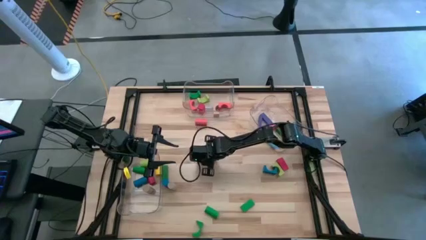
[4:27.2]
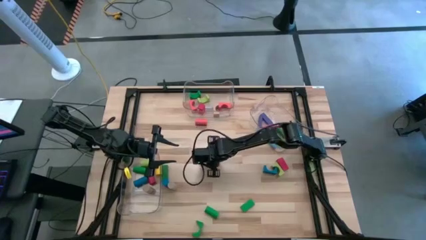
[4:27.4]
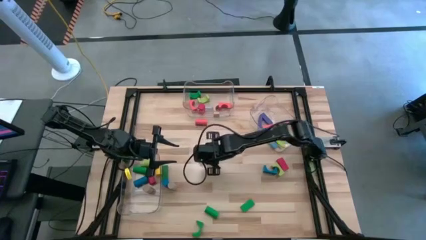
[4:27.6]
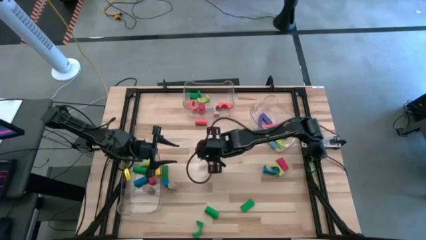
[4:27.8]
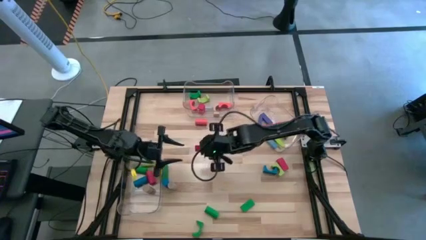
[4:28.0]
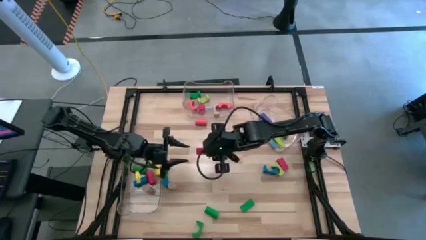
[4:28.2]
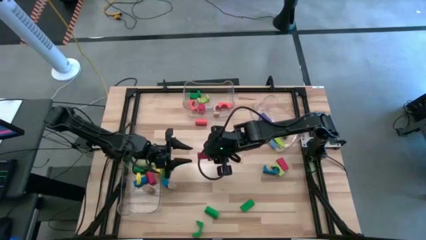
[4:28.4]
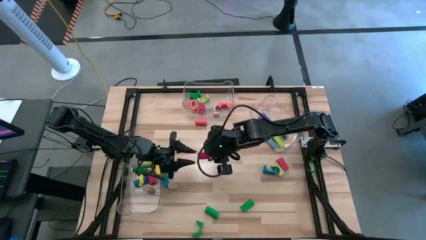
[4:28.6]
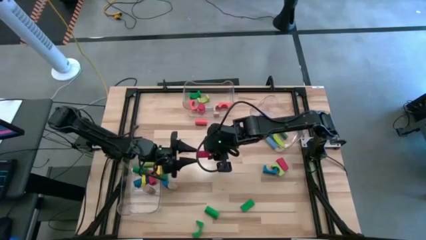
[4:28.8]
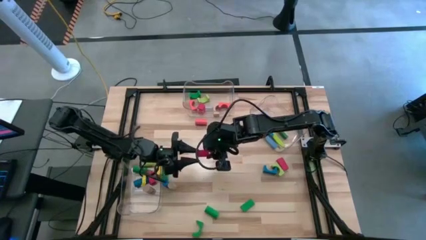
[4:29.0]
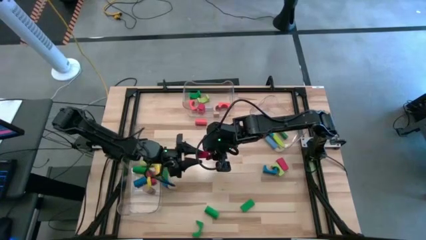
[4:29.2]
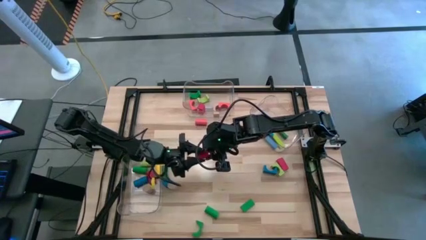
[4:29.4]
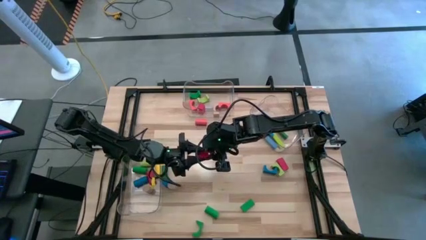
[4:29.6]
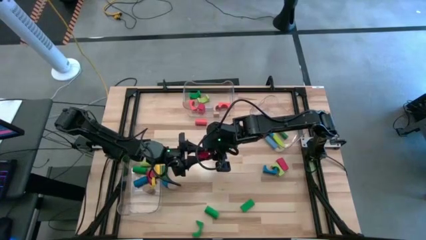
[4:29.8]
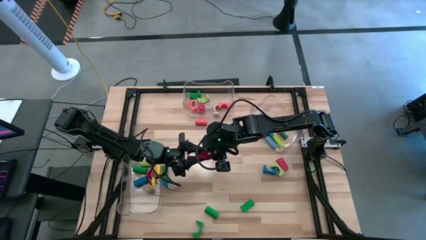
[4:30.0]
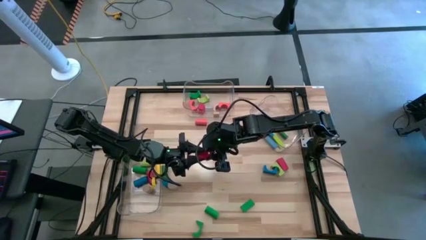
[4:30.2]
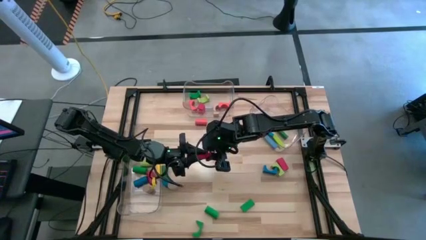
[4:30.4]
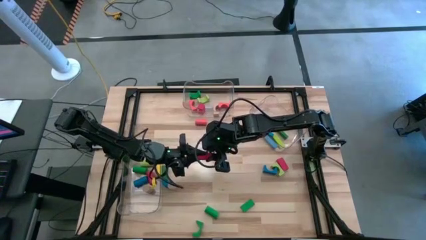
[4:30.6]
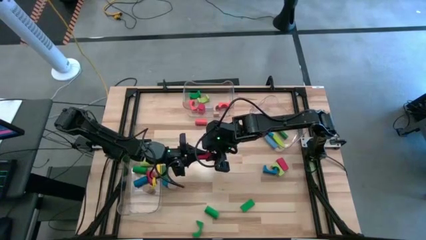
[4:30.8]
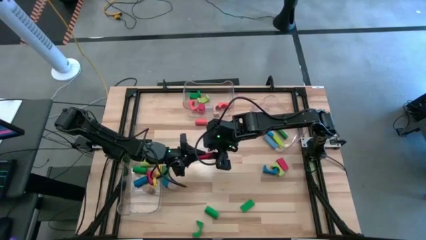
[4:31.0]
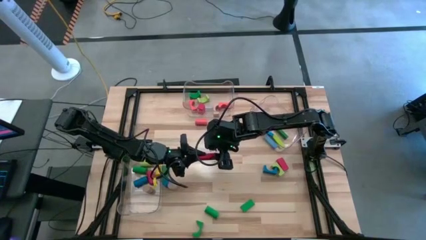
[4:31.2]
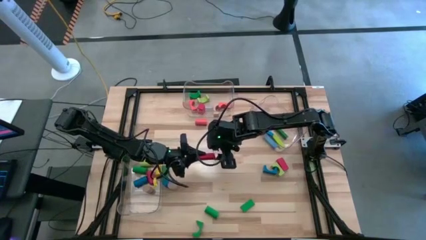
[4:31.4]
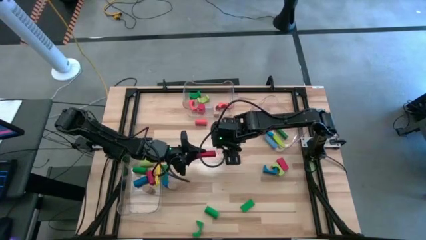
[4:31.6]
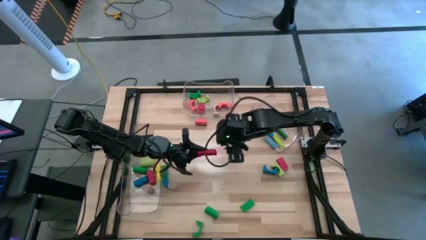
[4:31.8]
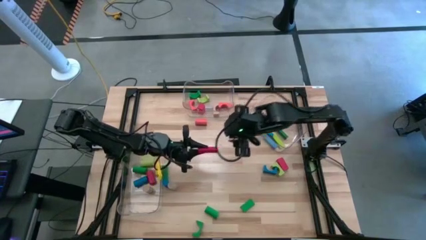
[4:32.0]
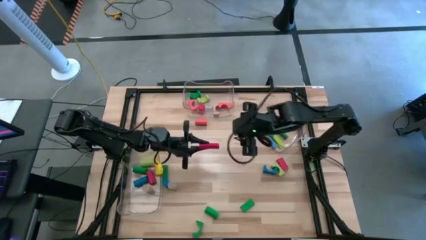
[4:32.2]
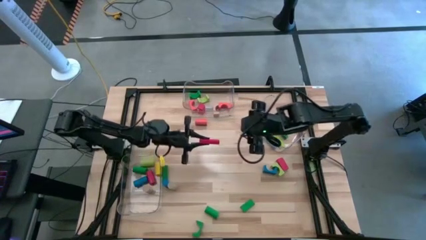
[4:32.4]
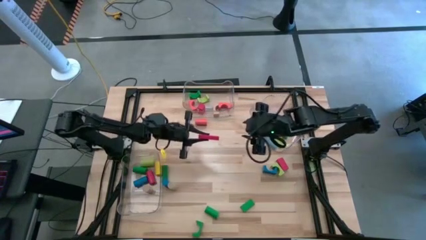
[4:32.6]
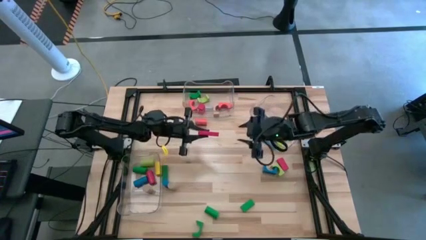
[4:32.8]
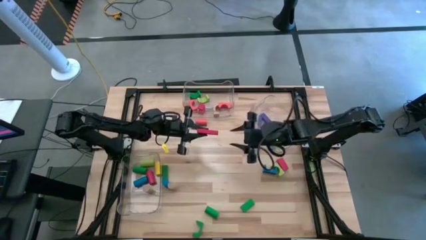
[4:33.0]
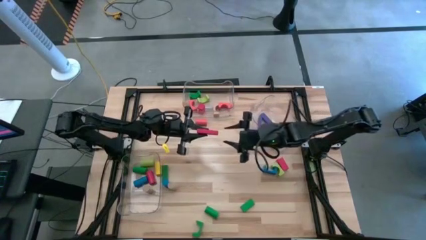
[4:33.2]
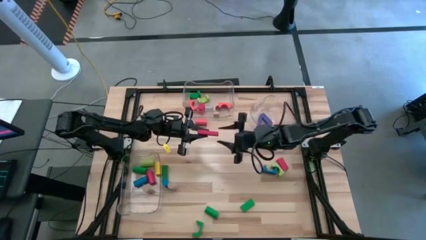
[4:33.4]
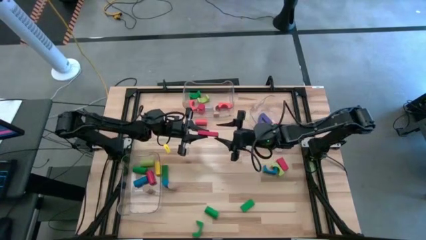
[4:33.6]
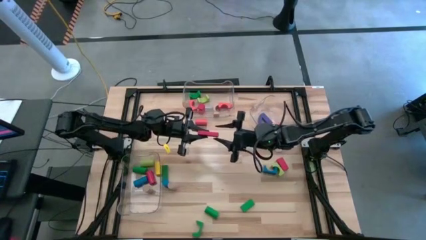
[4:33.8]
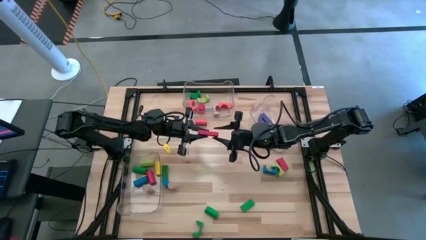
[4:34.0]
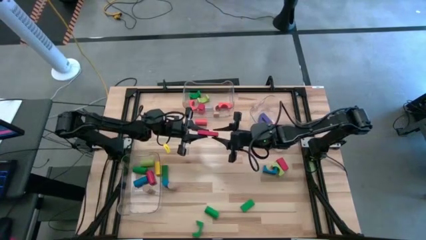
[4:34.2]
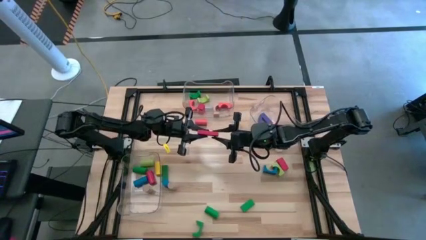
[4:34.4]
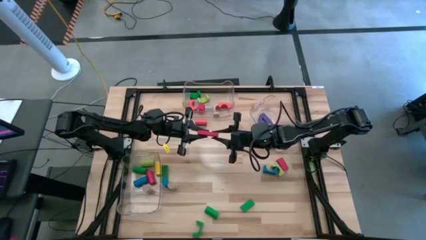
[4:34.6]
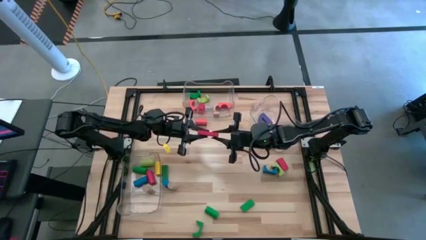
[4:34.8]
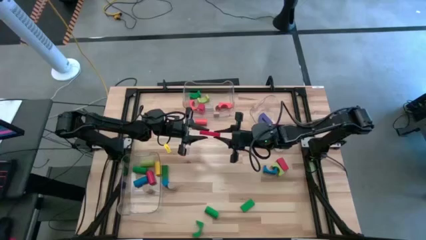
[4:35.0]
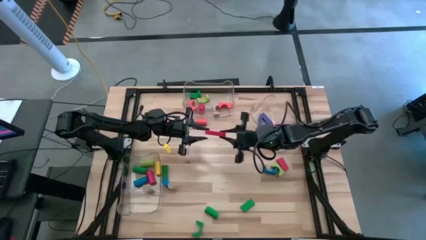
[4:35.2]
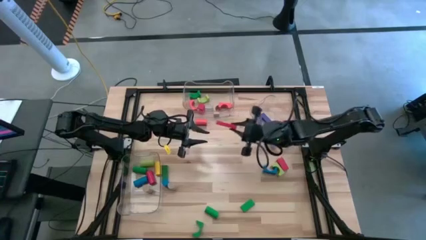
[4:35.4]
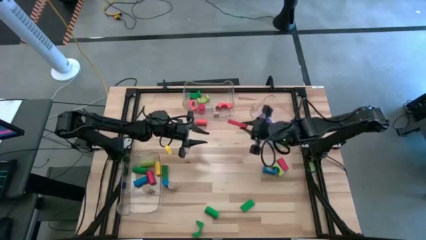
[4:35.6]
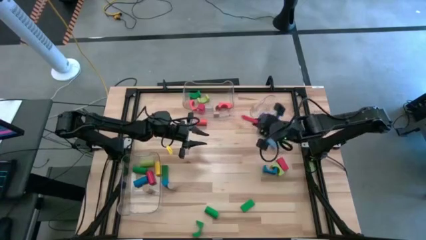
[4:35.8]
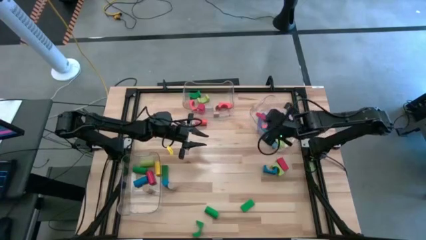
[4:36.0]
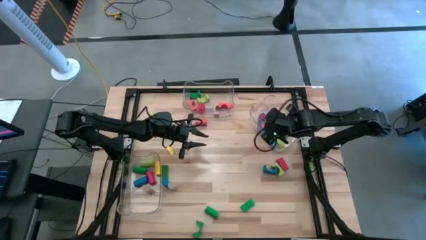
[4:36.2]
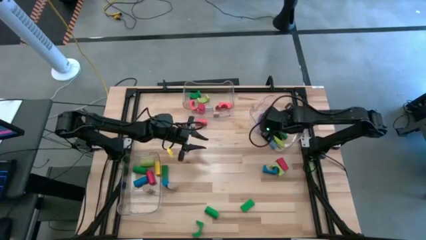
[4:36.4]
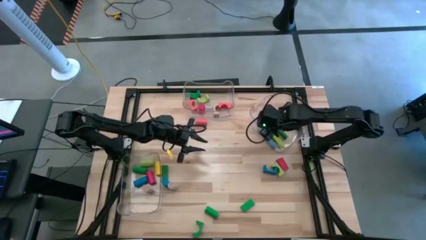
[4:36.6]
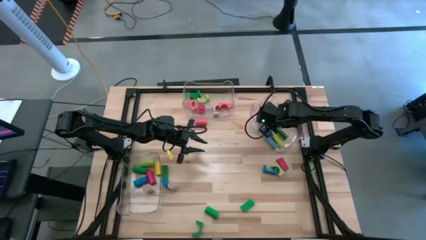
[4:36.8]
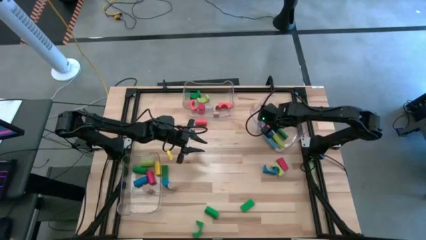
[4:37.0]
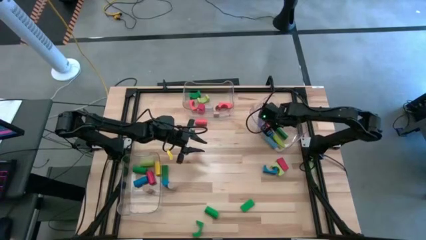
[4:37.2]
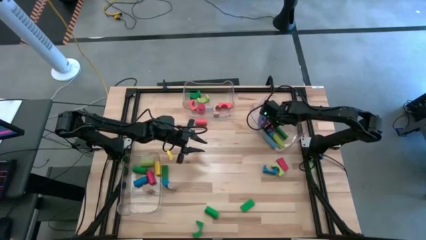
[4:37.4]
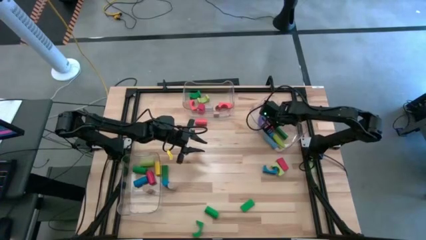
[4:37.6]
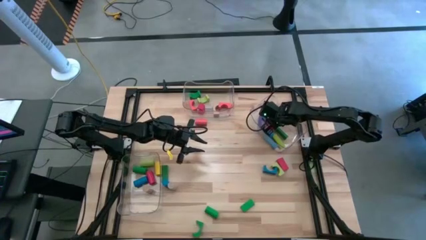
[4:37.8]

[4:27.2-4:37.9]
Task: Sort blocks by size
Put the red rectangular block into the right transparent bin
